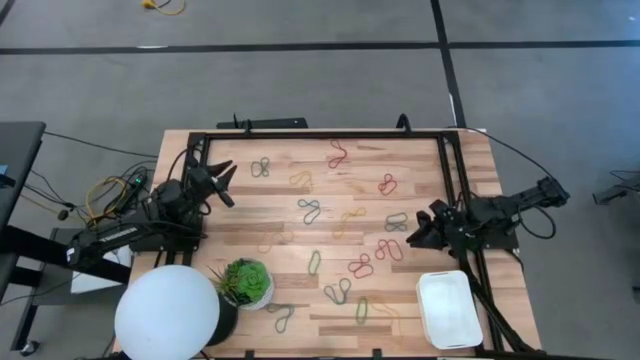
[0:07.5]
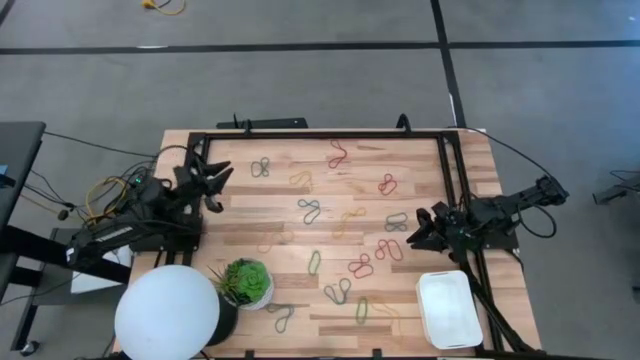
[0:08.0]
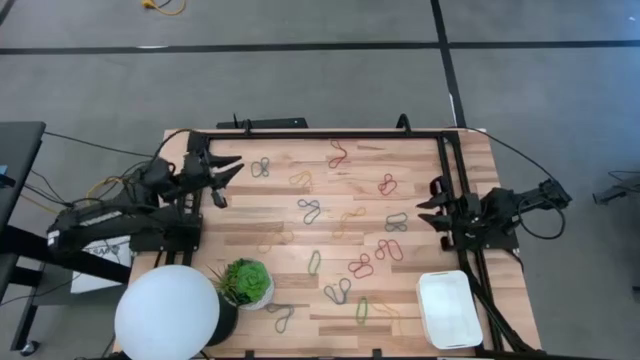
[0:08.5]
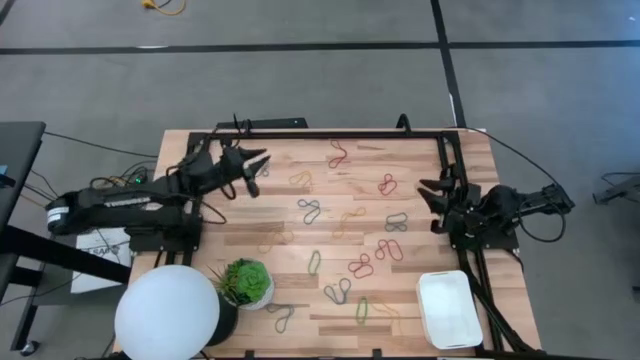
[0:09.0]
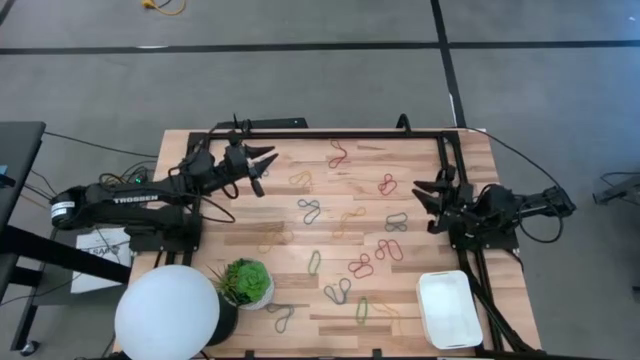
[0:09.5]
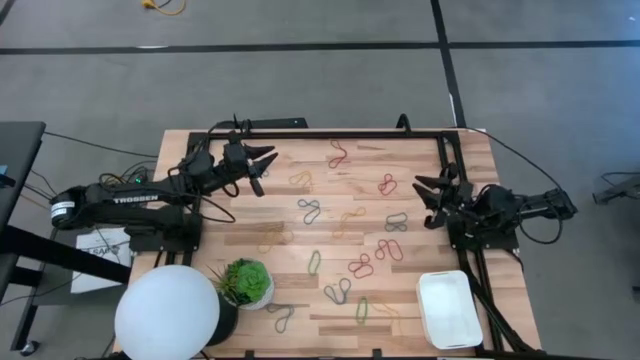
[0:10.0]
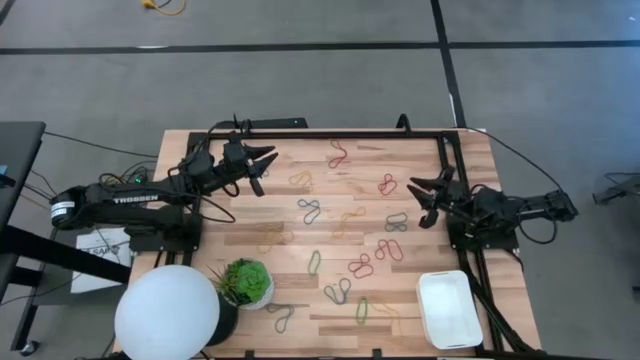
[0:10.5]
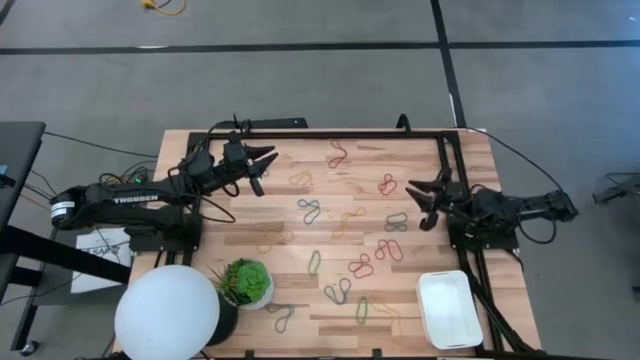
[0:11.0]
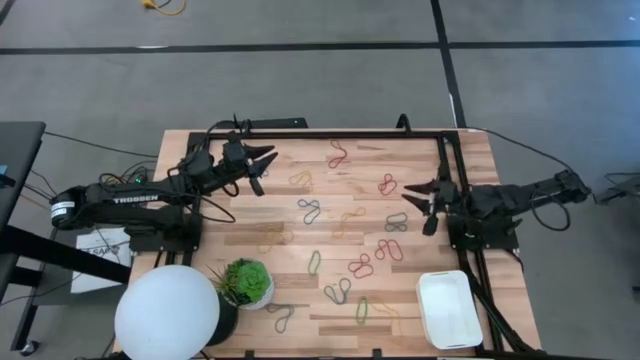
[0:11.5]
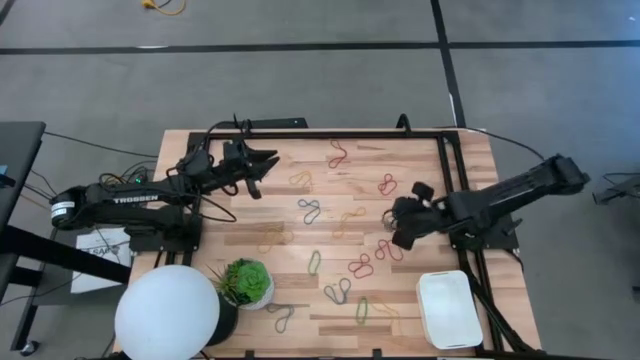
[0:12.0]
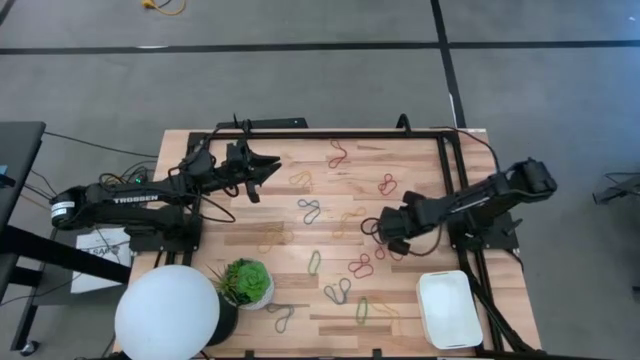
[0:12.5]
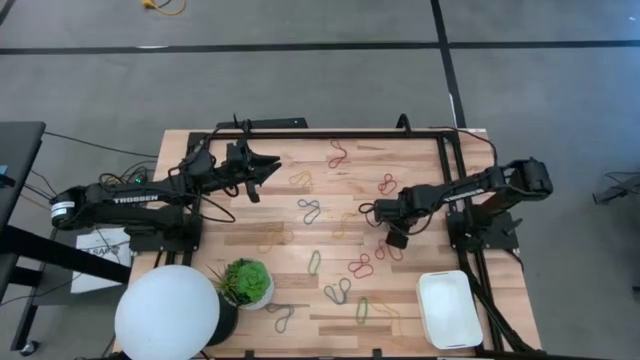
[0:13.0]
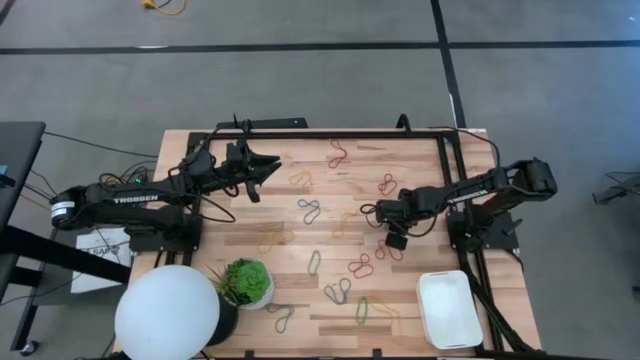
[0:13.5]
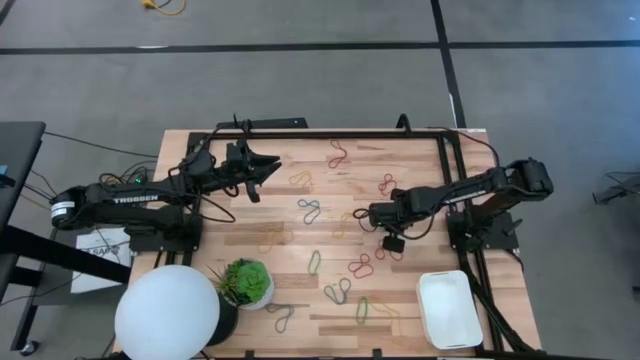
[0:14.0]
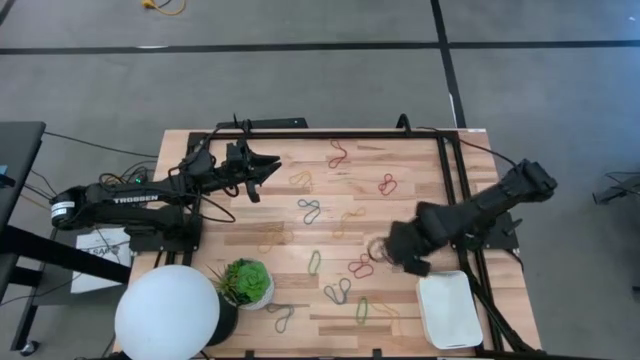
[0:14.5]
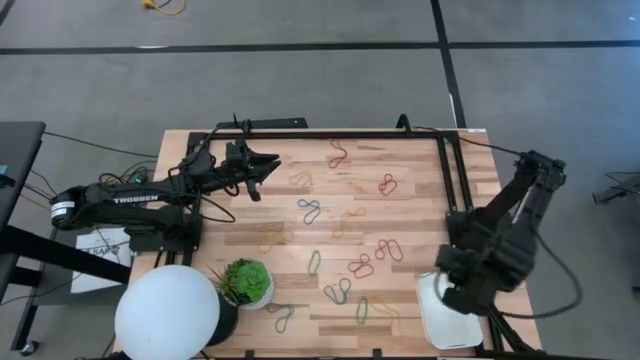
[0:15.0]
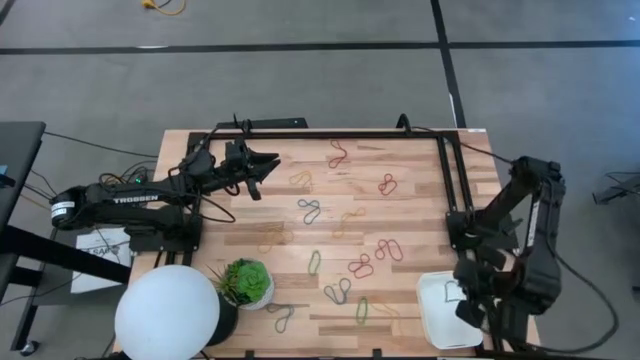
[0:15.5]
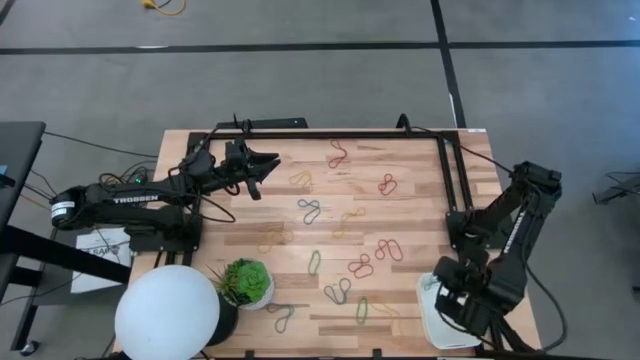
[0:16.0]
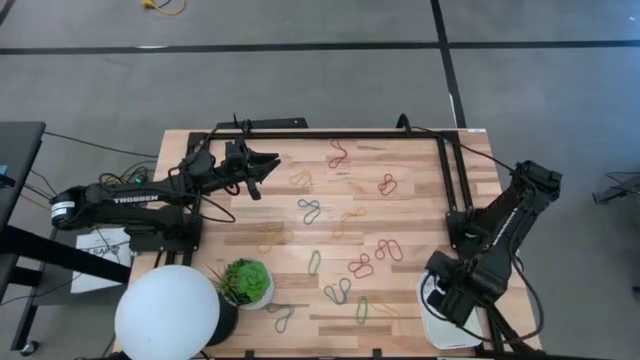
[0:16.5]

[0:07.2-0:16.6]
Task: Pick and place items into bin
Put the blue rubber band into the white bin

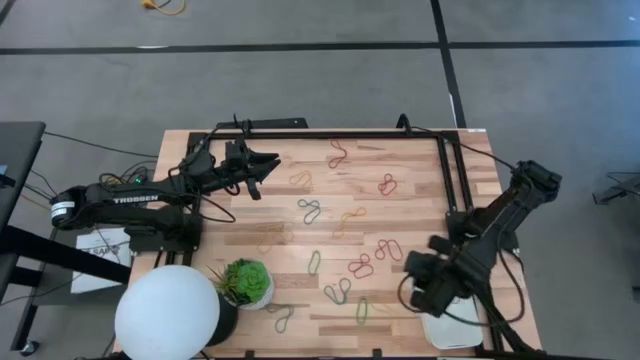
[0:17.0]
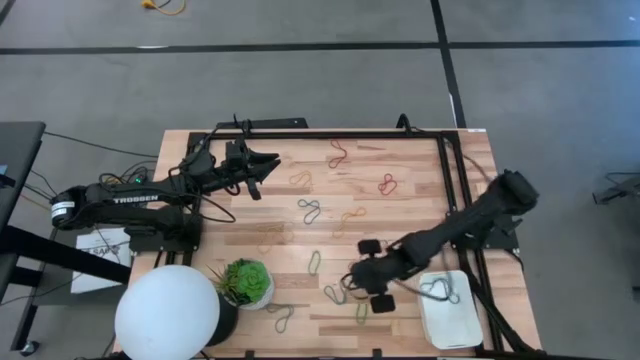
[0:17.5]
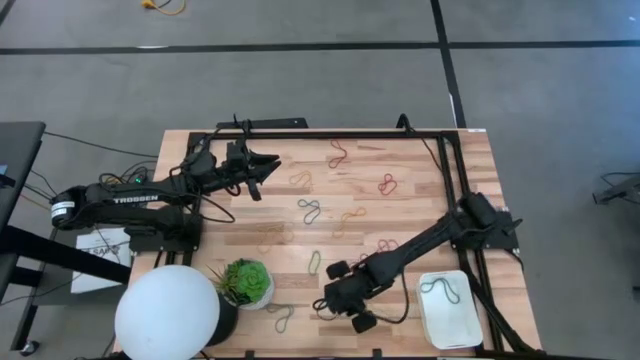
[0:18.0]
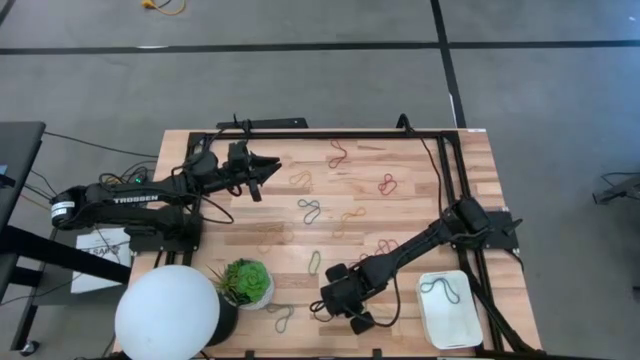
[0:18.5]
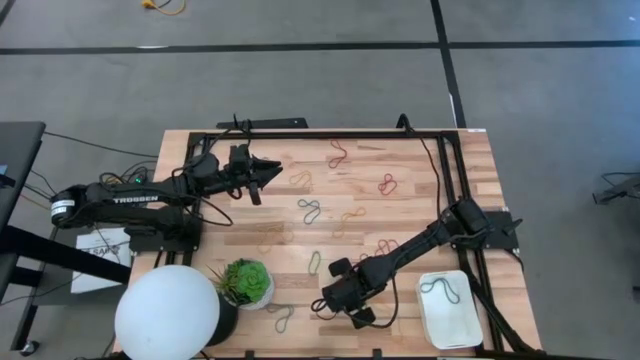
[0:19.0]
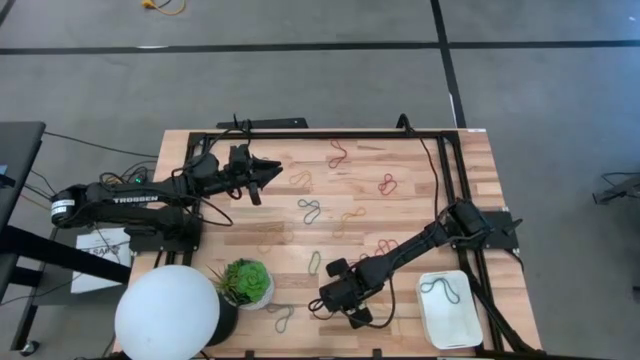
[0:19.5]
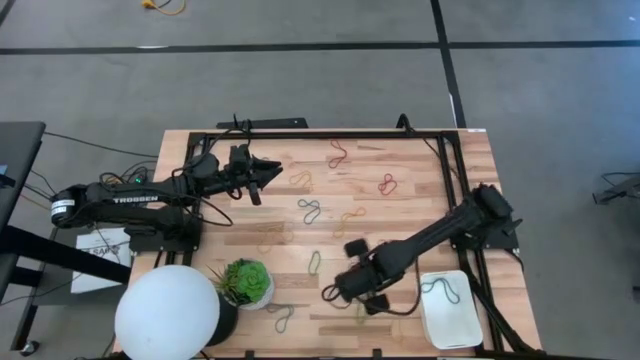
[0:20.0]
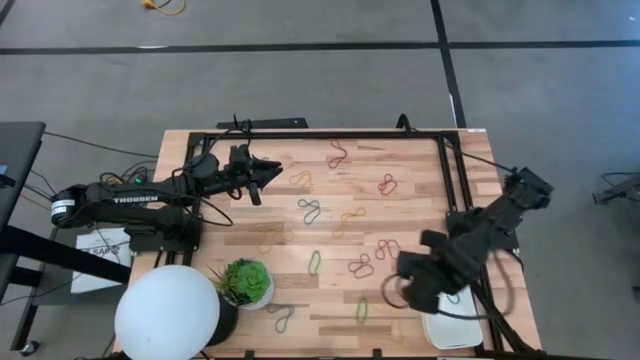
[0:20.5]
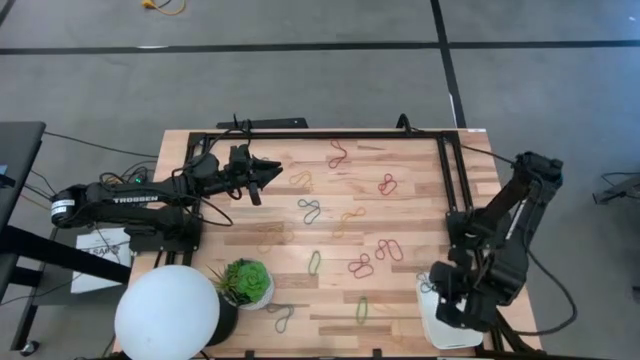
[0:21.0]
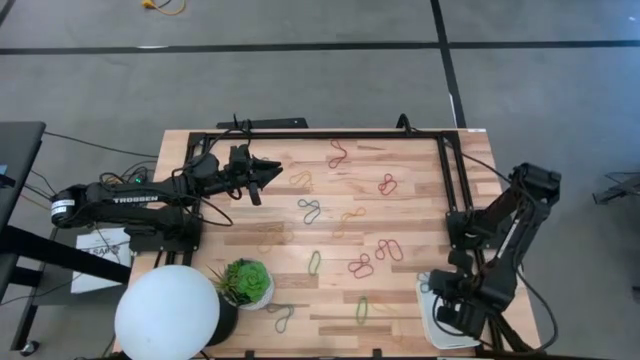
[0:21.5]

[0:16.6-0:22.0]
Put the blue rubber band into the white bin

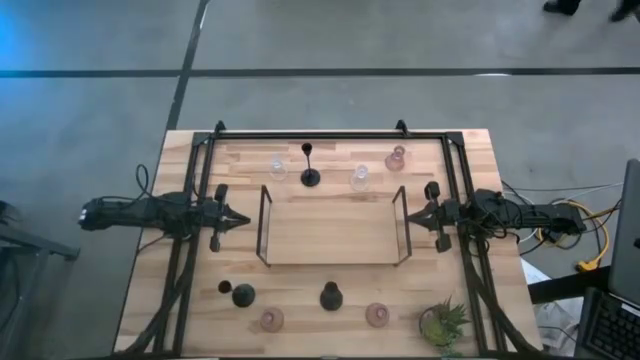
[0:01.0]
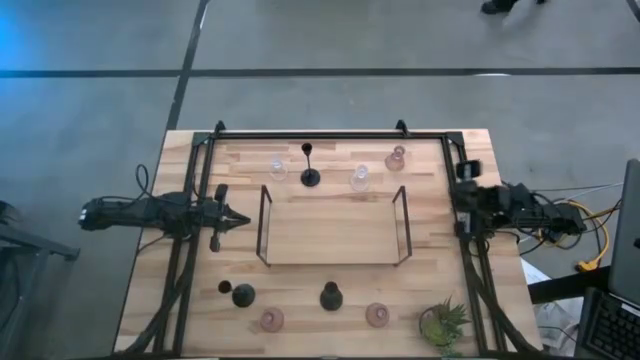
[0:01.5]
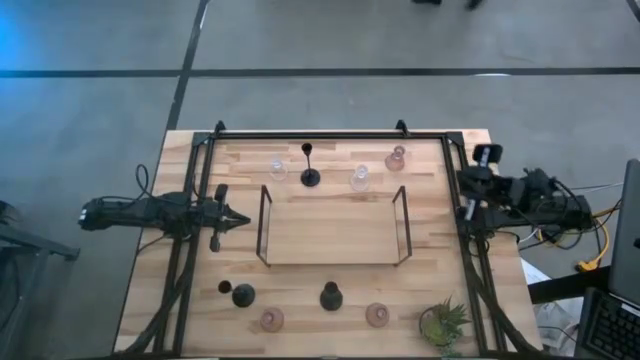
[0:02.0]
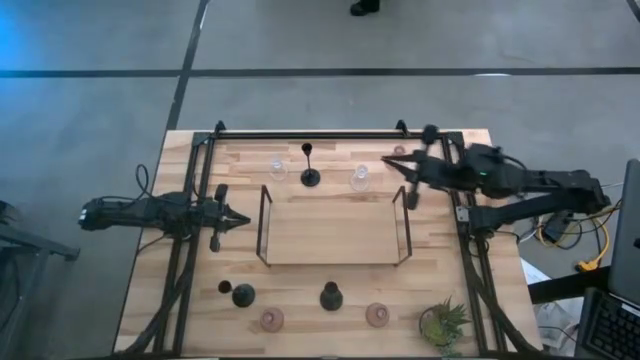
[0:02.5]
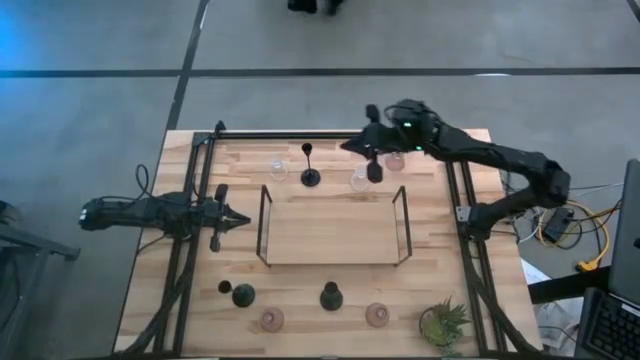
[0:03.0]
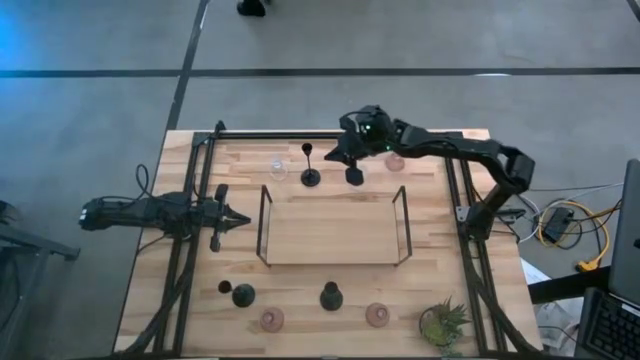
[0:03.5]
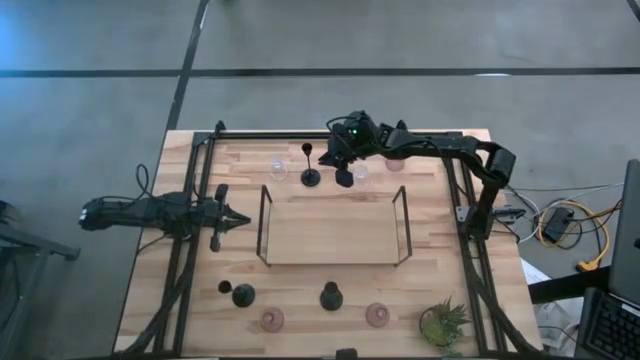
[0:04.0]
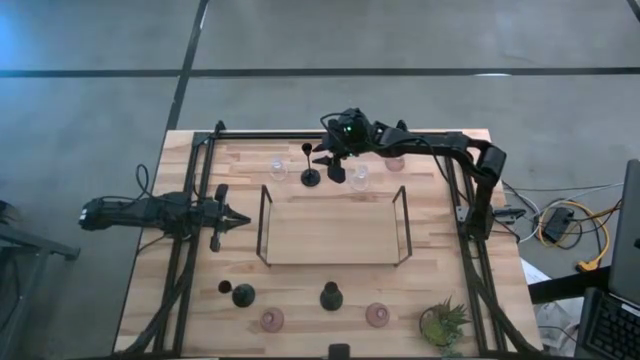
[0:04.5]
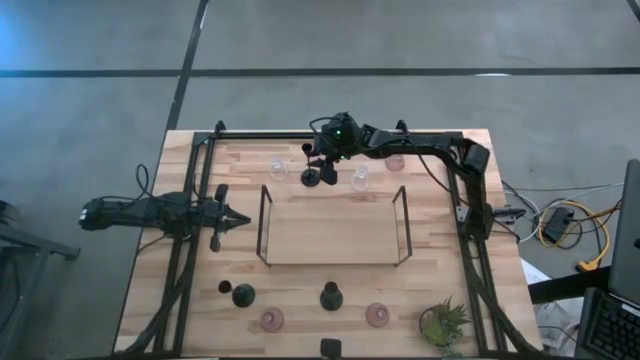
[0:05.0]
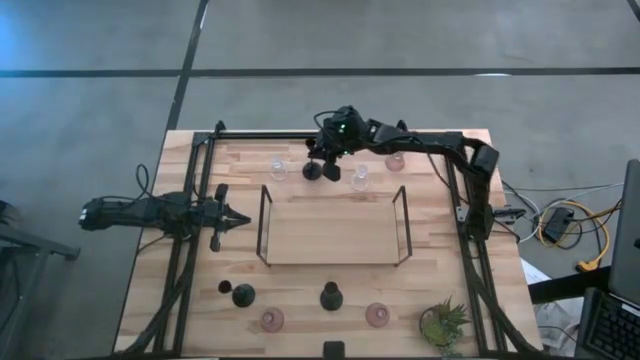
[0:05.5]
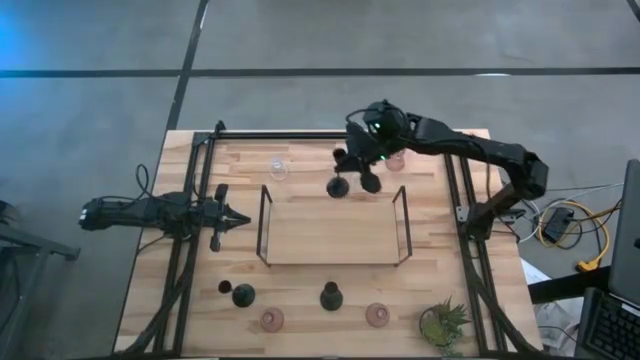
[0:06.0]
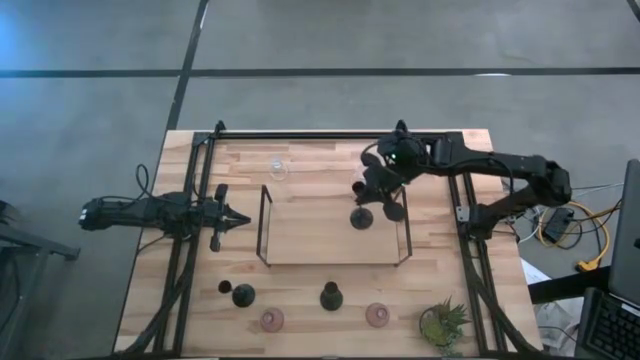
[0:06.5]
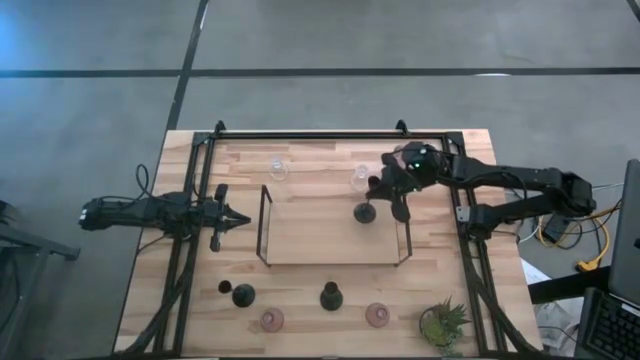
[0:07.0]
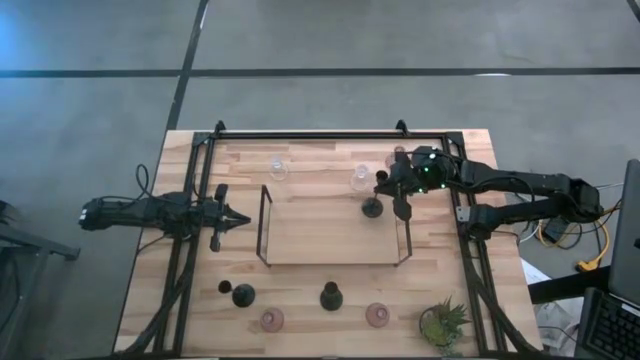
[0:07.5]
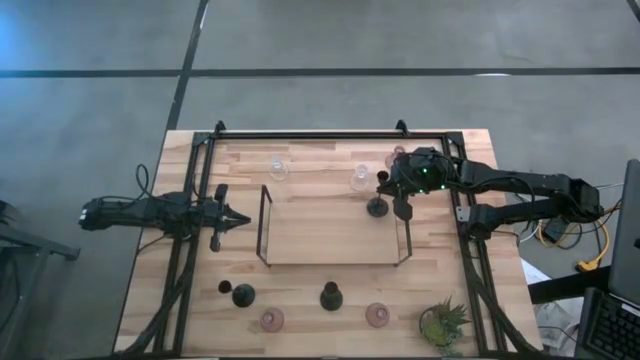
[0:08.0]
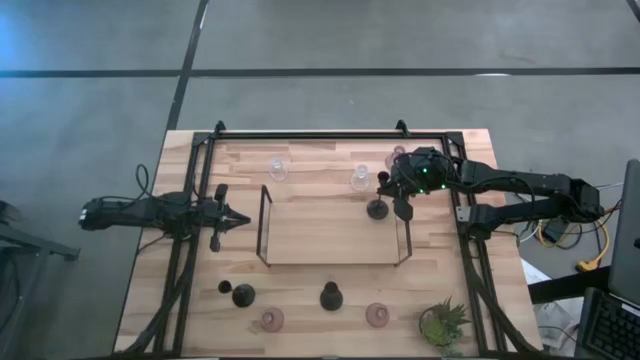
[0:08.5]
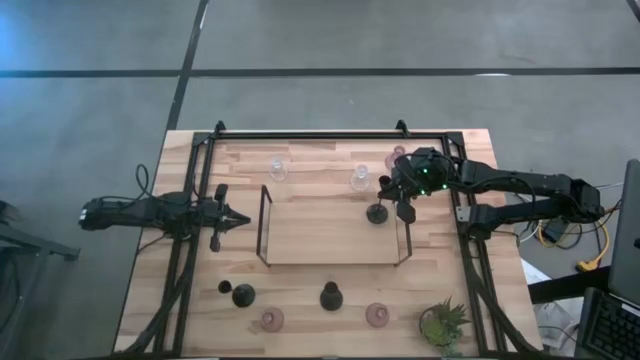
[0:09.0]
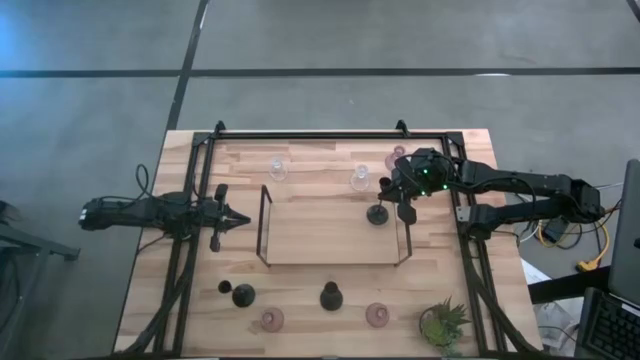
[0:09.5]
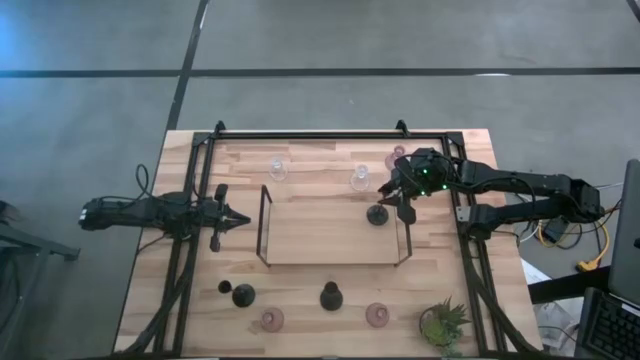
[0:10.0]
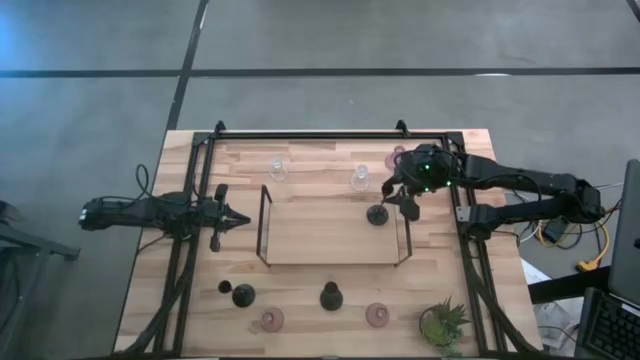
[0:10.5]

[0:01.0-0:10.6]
Task: Pick & Place candle stick holders
Put the top black candle holder on the shelf
